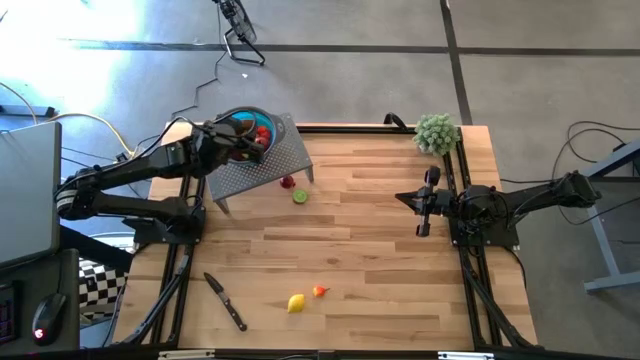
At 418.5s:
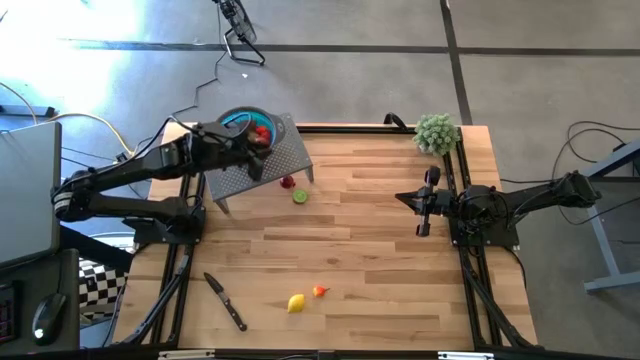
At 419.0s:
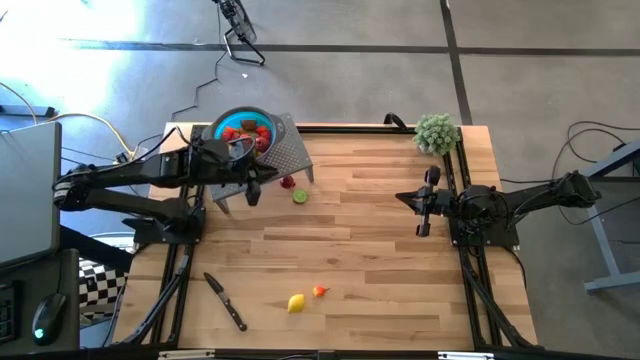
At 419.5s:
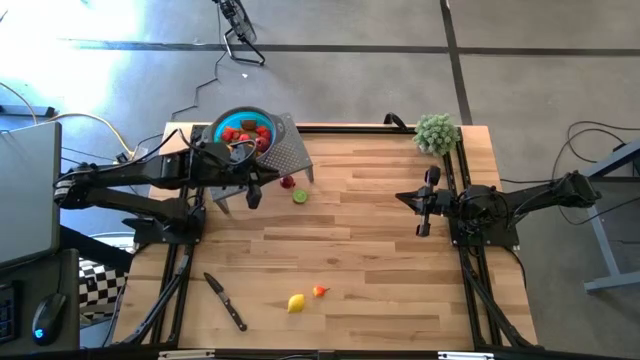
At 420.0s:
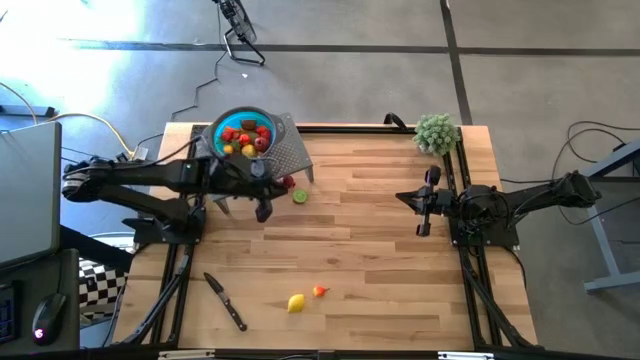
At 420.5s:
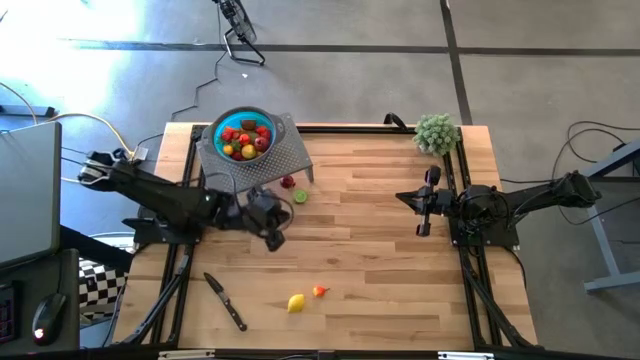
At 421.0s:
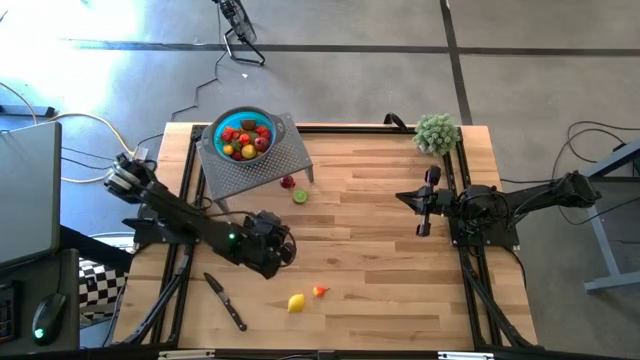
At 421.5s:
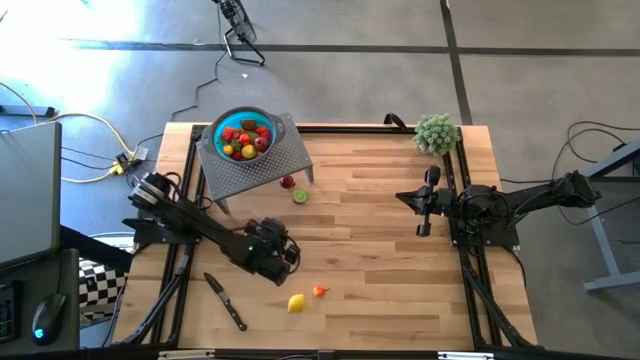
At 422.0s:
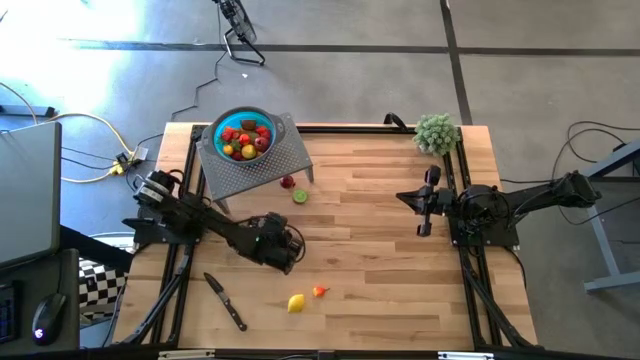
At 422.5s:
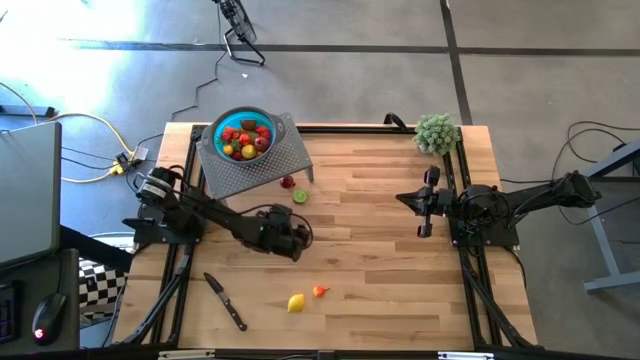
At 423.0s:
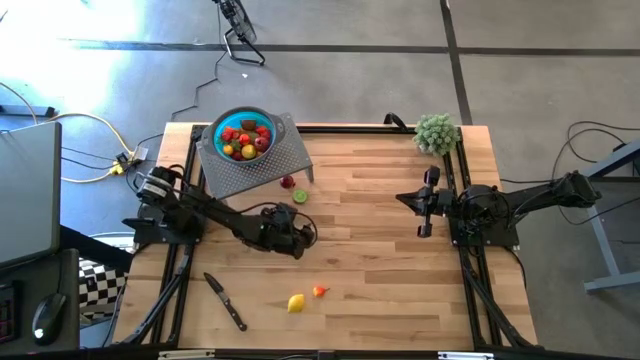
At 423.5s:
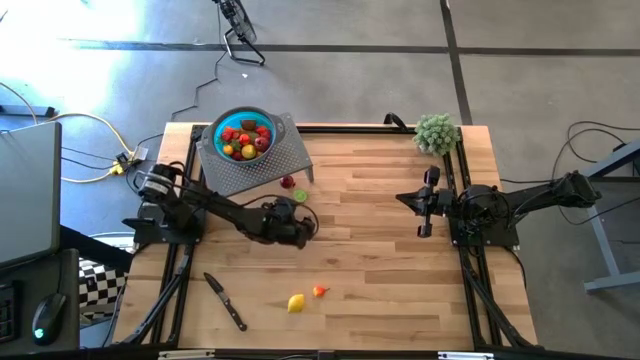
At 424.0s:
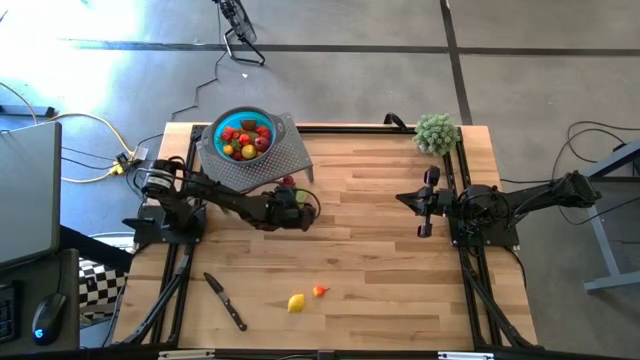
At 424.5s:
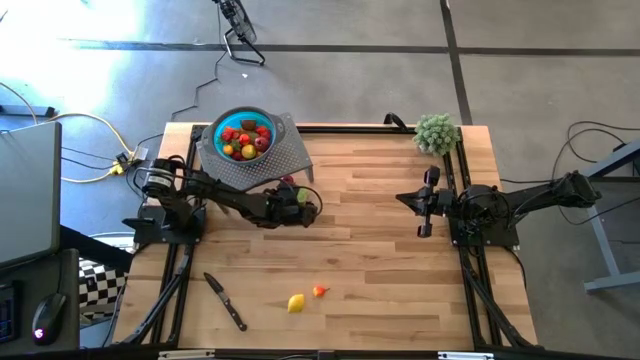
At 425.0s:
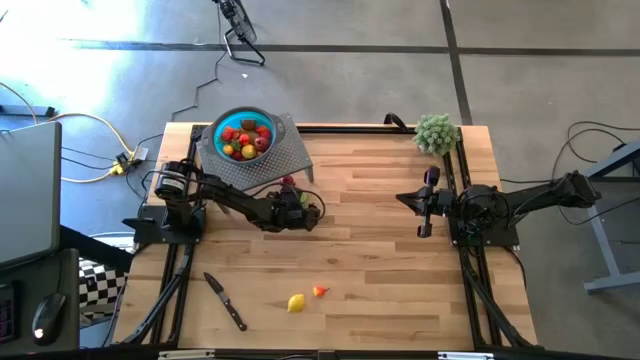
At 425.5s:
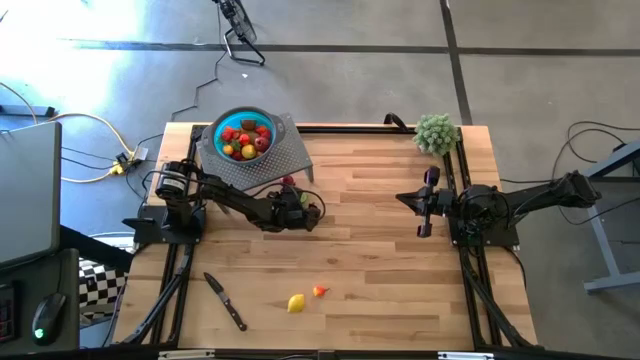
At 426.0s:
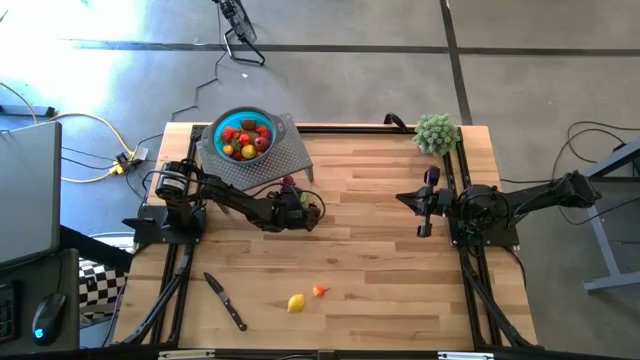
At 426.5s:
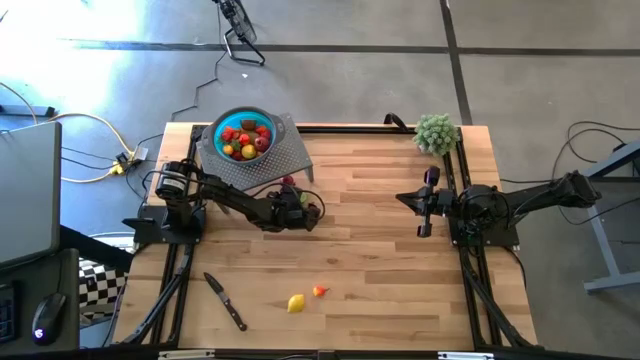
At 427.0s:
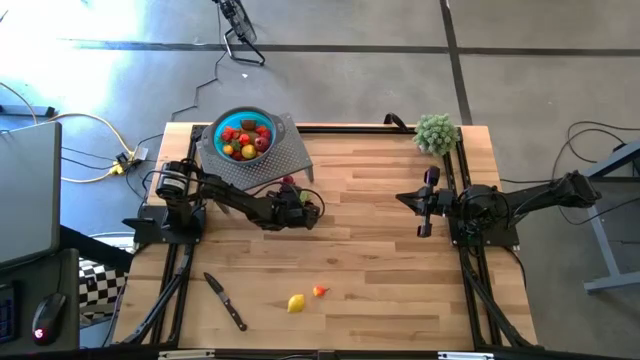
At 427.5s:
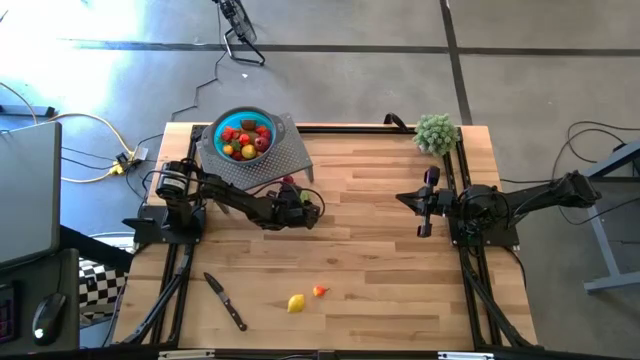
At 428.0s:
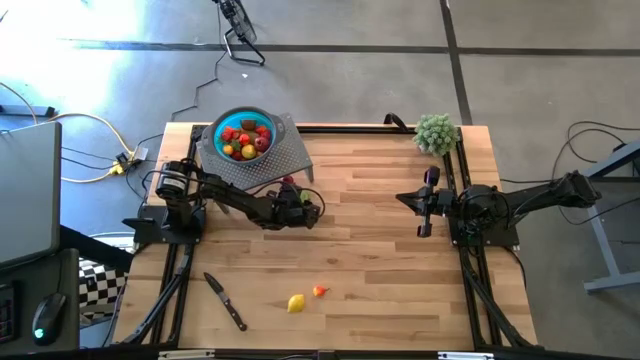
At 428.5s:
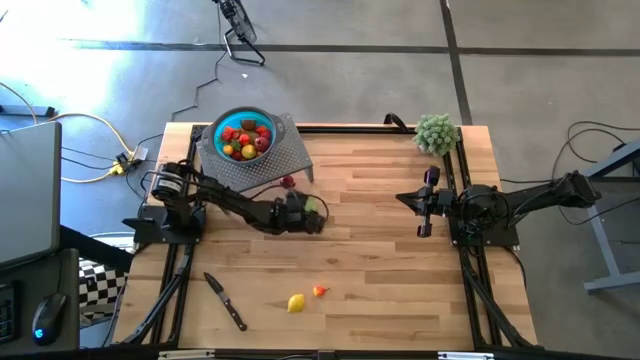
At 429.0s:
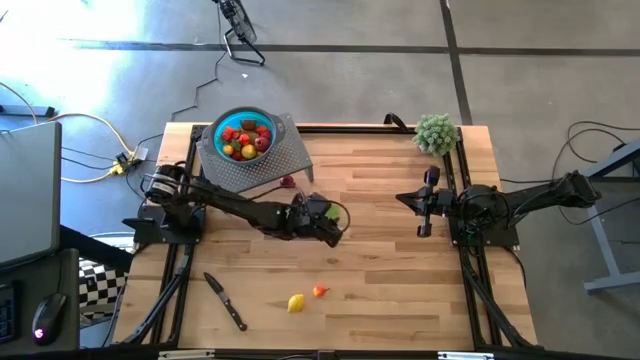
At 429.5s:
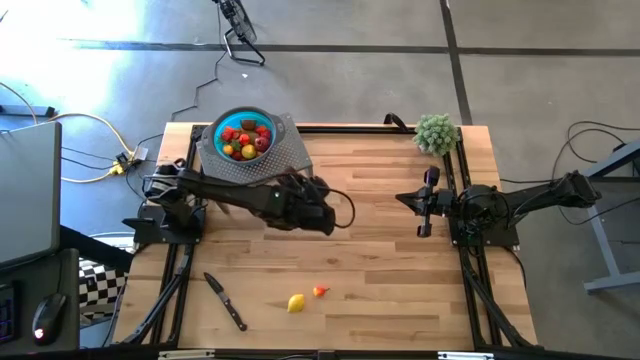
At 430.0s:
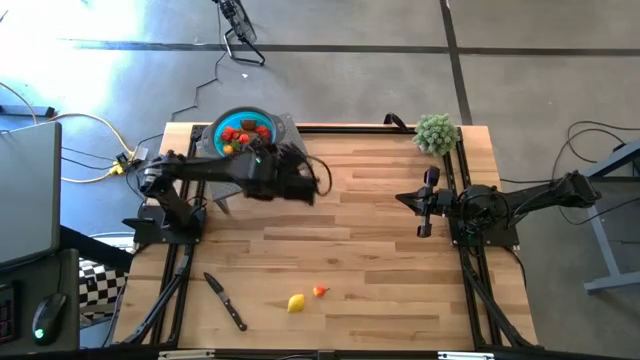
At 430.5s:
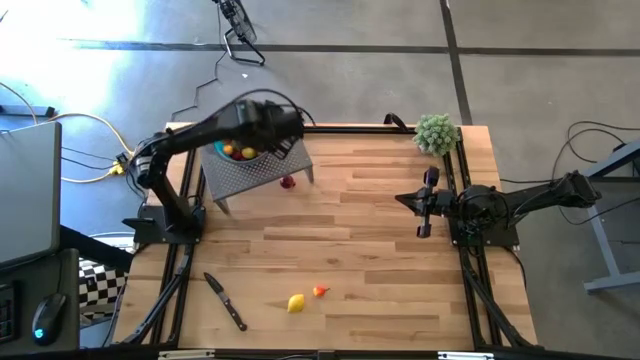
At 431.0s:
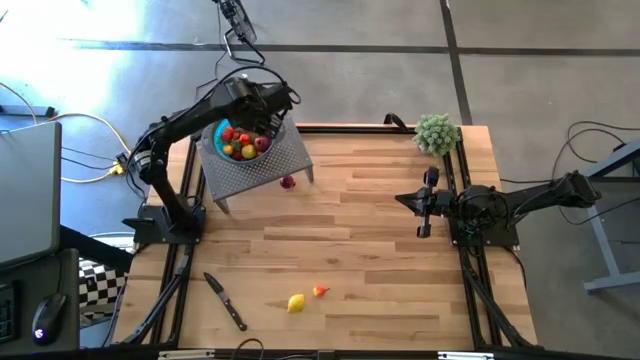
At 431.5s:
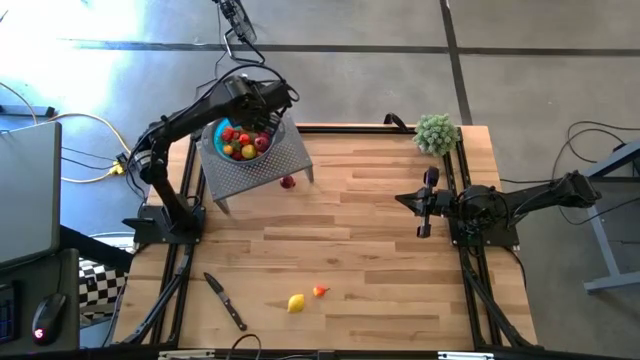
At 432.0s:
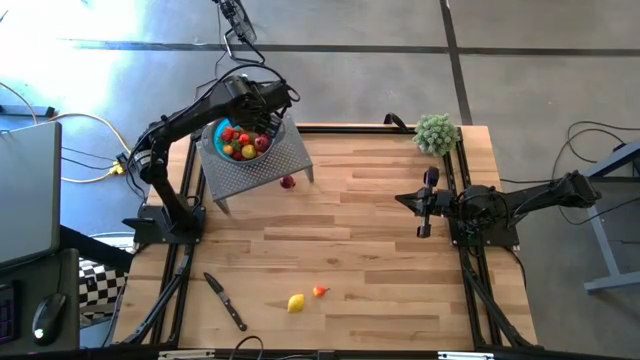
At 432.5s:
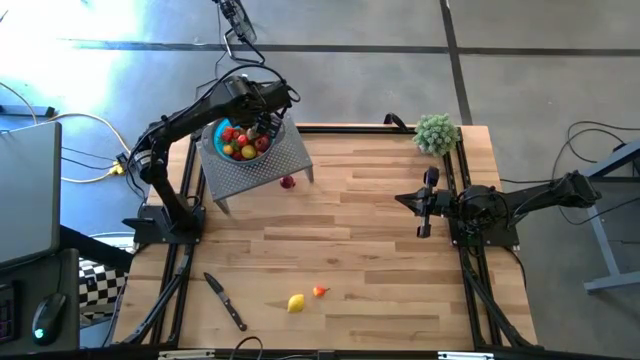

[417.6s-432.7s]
Task: Pick & Place Fruit
Put the half brown kiwi into the blue strainer bowl on the shelf

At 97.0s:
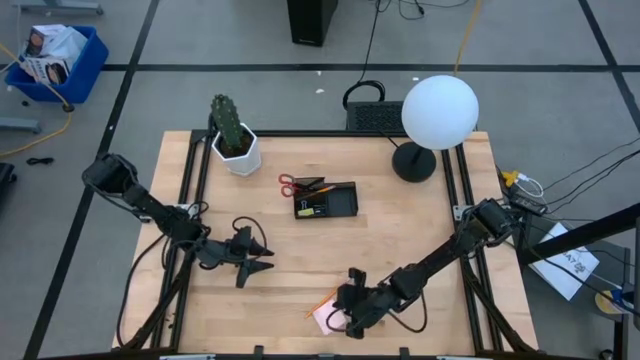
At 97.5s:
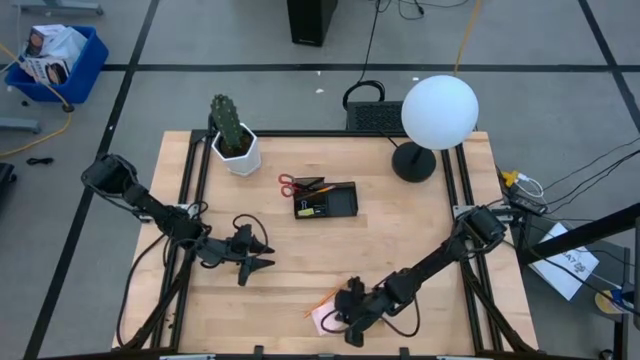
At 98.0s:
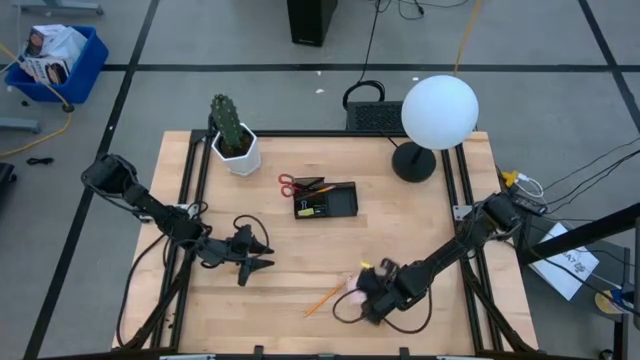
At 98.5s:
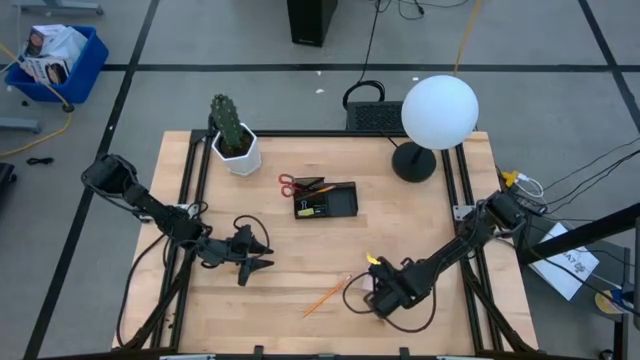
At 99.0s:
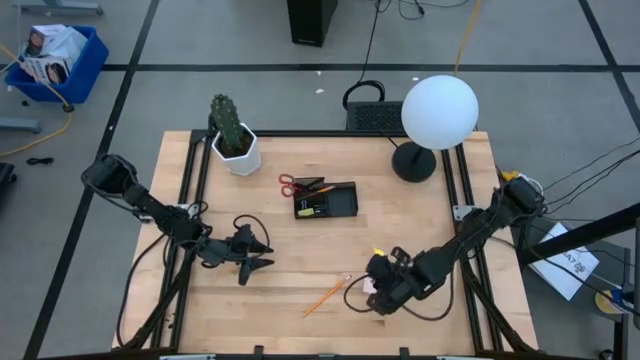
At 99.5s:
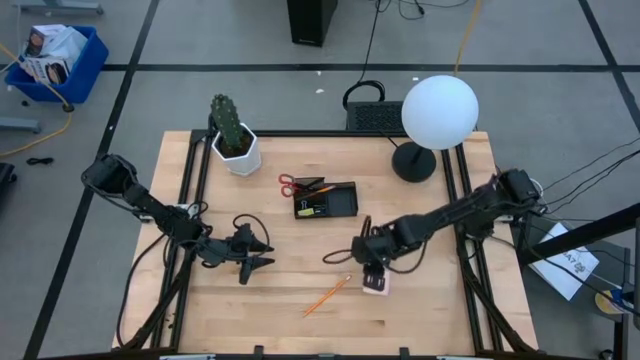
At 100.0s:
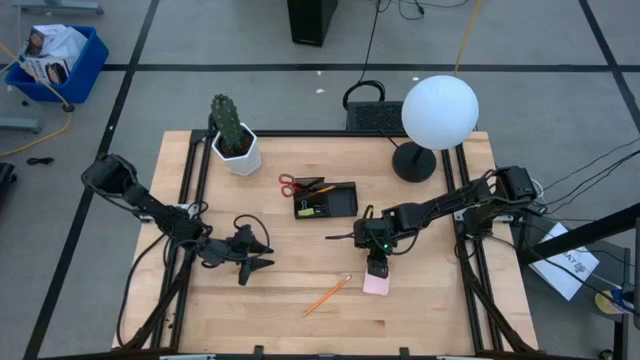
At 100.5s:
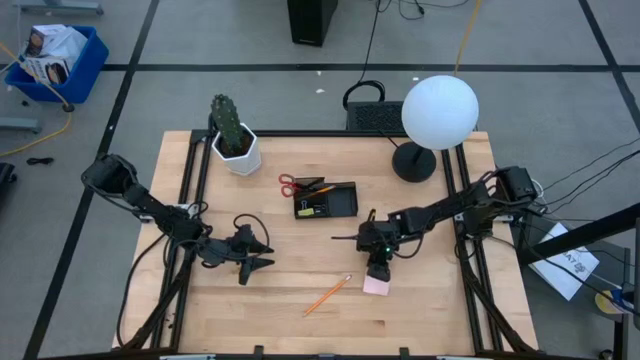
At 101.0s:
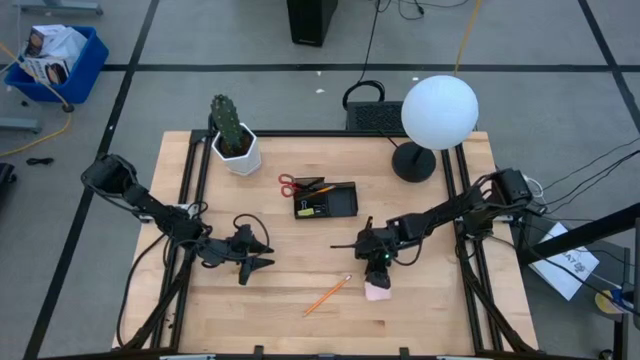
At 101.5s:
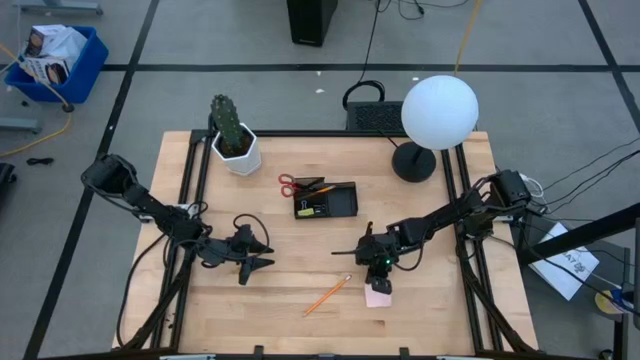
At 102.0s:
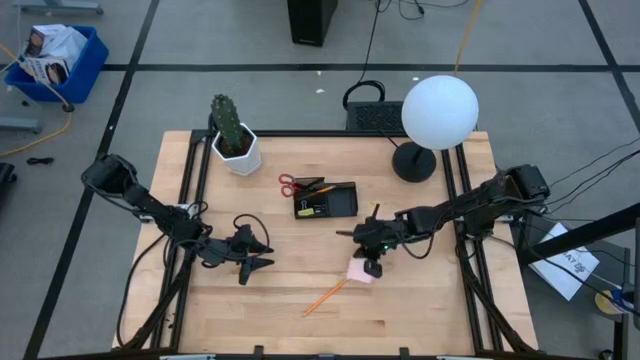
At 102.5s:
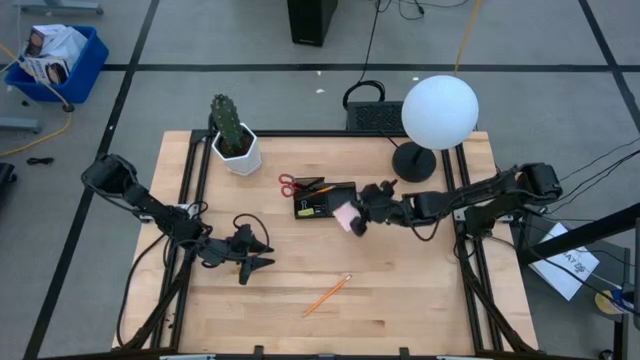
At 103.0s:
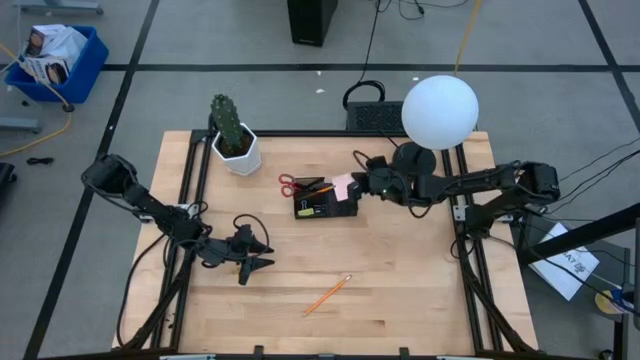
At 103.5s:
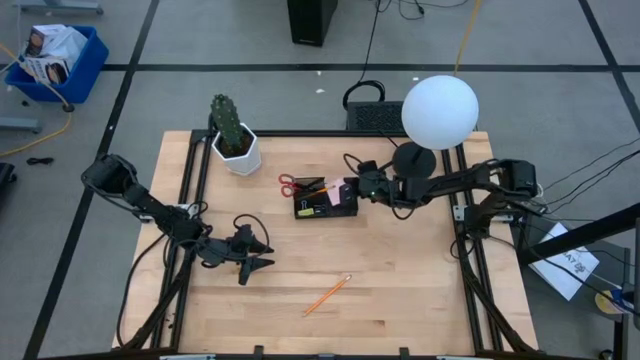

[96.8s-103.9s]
Task: Pick and place office supplies into organizer
Put the pink sticky notes into the right of the desk organizer
